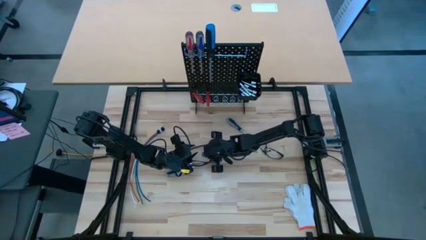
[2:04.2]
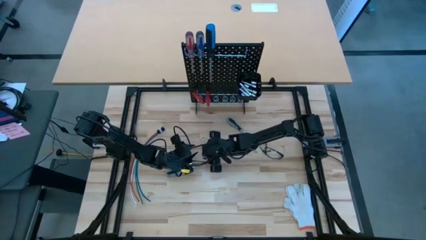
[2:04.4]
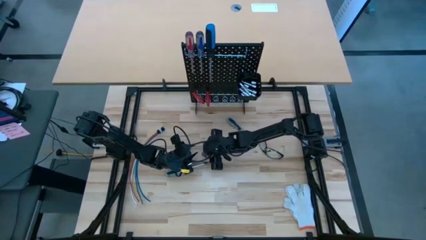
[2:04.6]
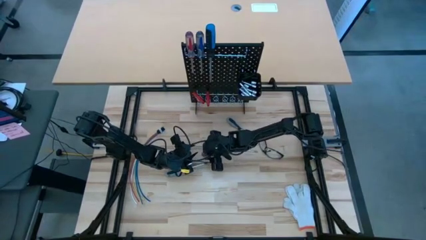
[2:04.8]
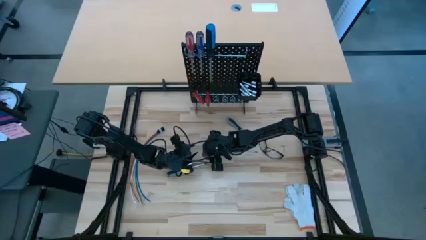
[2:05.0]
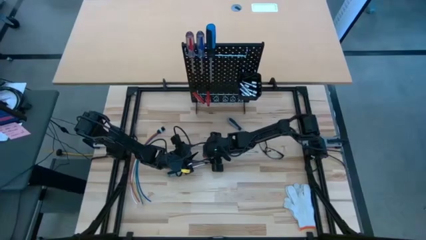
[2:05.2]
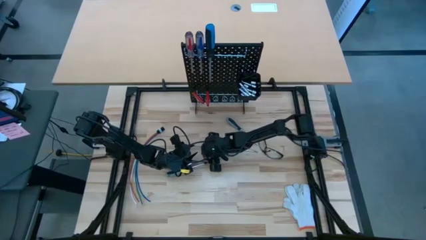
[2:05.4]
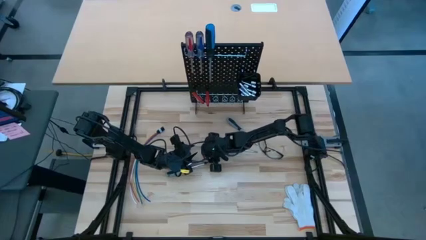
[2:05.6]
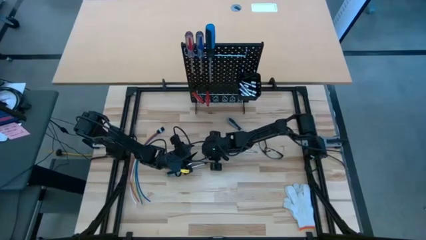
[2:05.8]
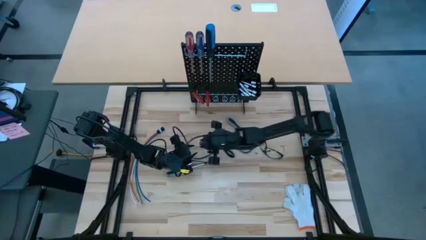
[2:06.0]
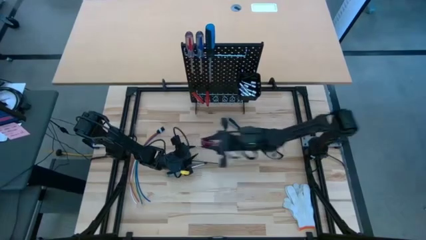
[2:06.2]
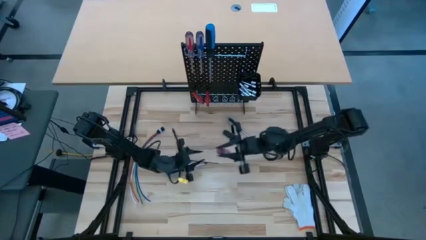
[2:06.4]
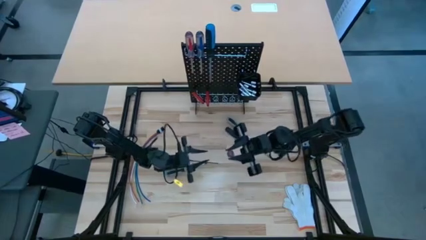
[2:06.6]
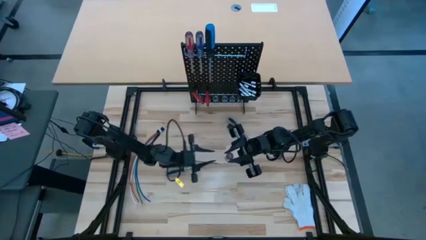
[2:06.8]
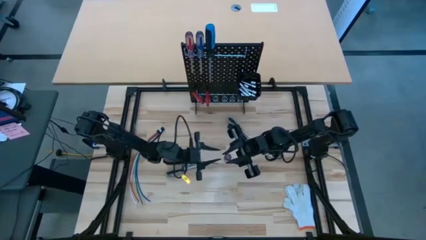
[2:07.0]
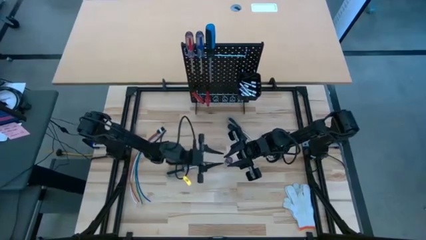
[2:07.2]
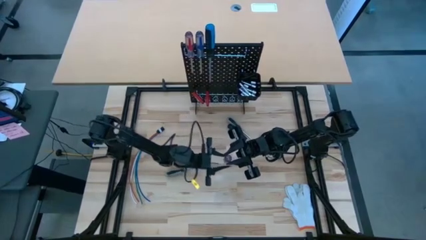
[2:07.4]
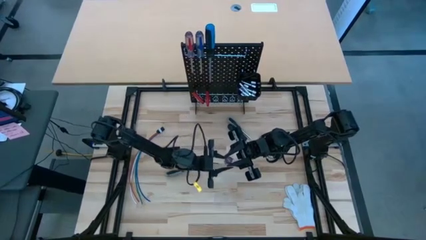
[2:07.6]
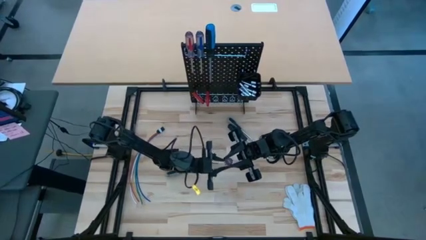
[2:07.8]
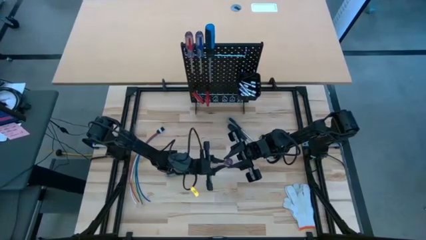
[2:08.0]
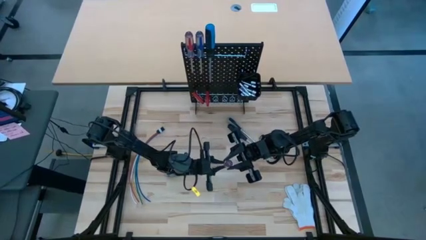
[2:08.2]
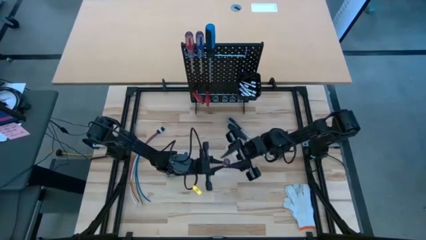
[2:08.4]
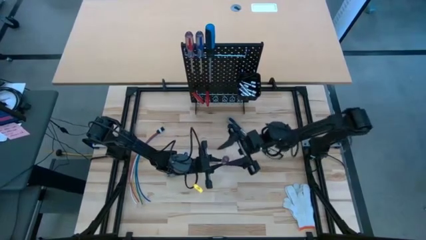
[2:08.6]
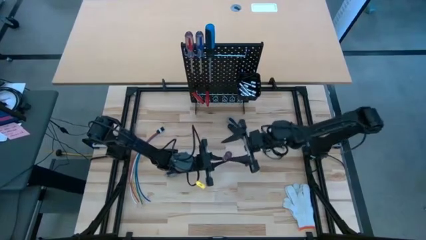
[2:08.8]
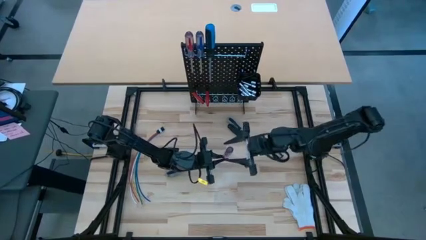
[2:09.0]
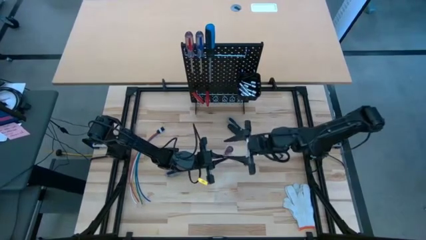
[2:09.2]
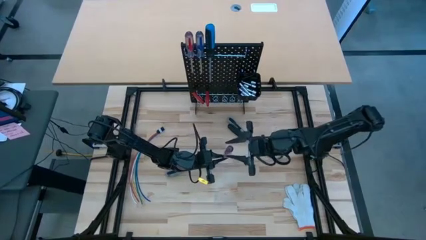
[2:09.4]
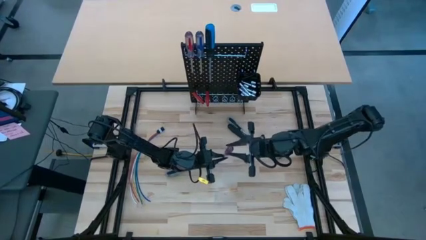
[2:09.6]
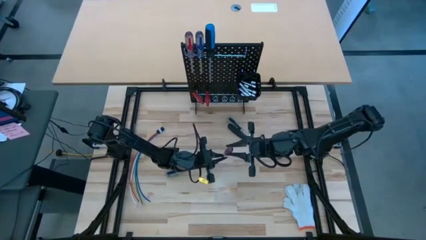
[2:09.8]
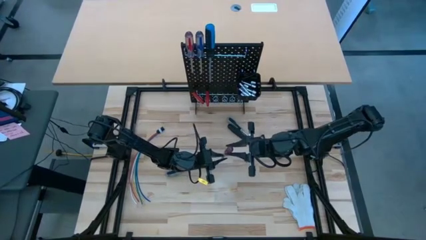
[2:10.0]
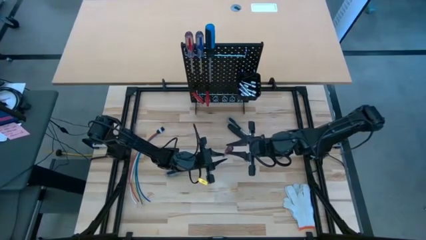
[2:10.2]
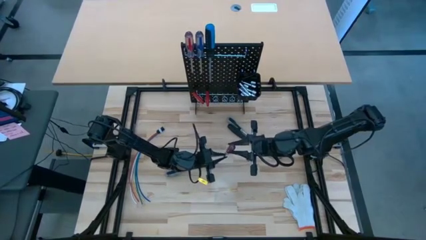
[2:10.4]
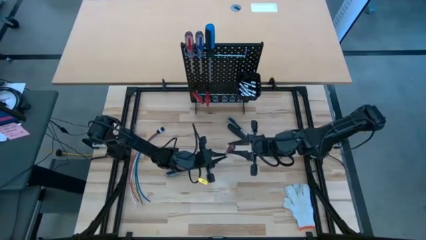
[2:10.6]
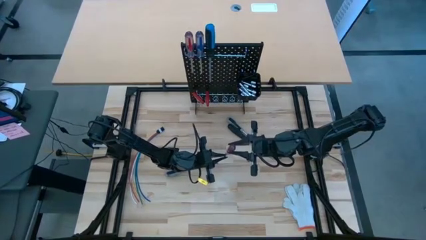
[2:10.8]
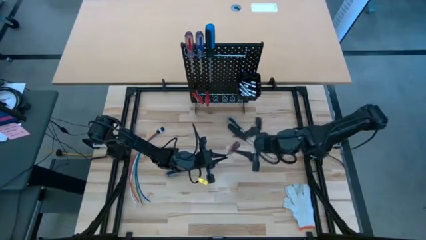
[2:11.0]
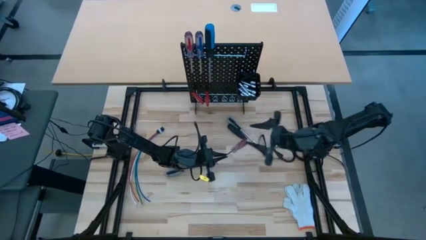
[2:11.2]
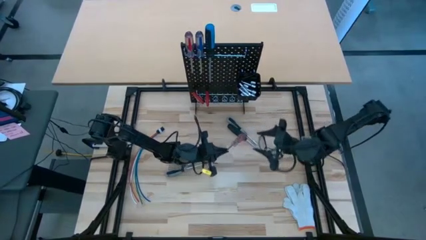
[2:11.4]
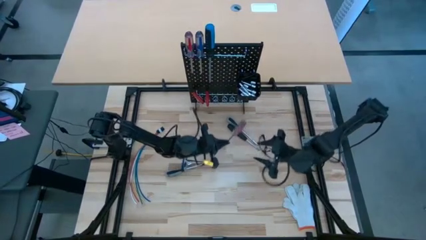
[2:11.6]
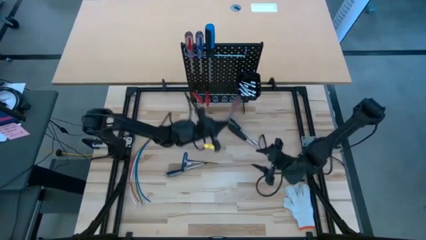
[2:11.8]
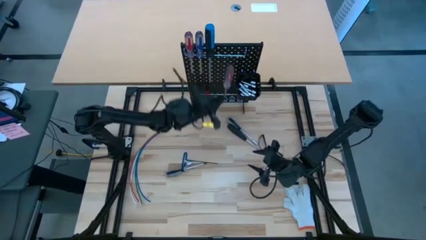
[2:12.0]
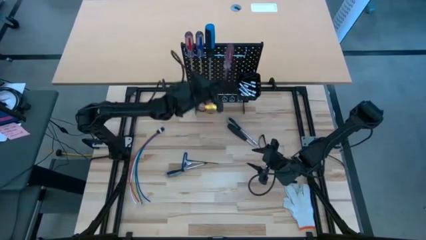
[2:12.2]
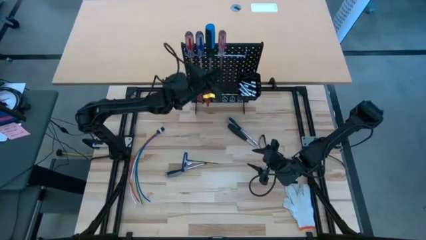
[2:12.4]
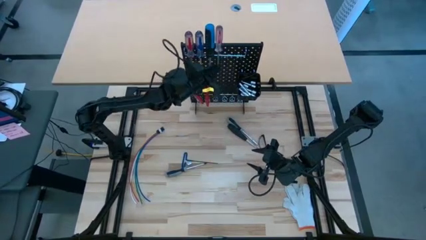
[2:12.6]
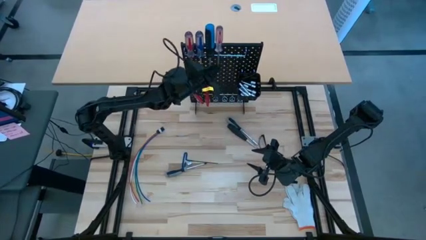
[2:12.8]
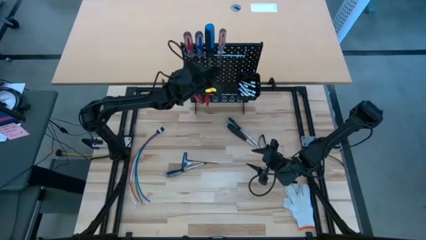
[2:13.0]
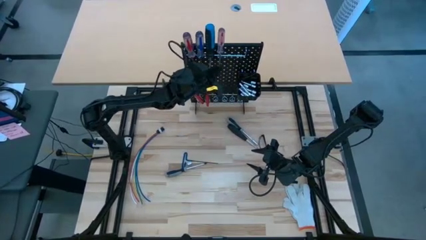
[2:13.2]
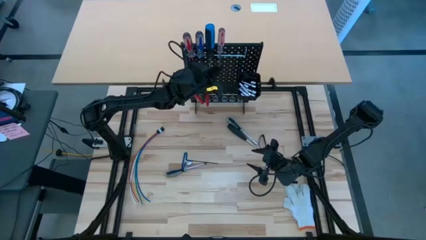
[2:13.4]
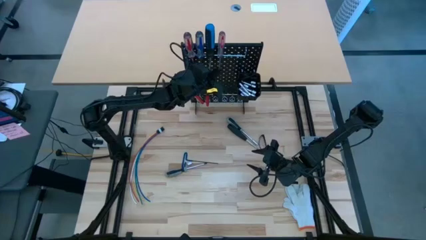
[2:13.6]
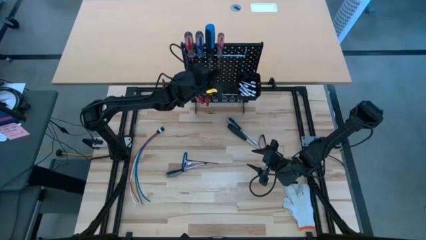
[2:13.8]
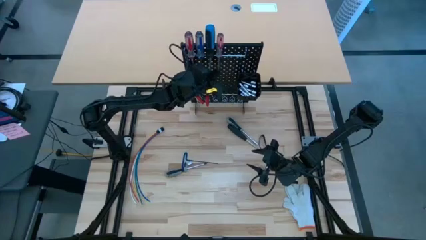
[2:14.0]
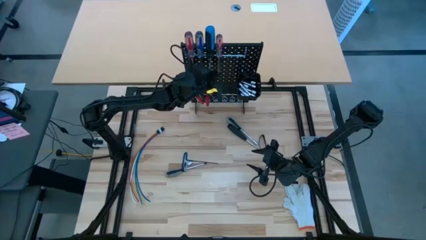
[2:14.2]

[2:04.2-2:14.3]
Task: Hang tools onto peg board
Hang the red screwdriver on the pegboard
